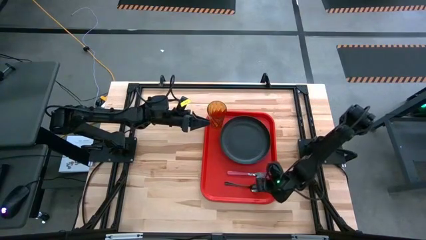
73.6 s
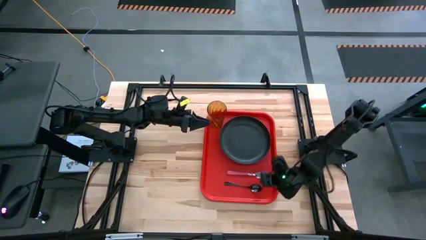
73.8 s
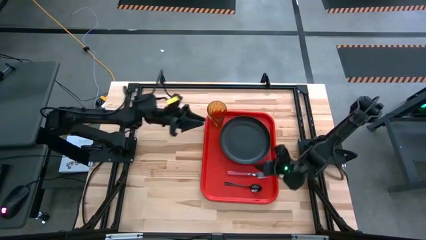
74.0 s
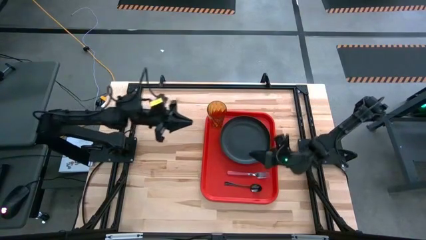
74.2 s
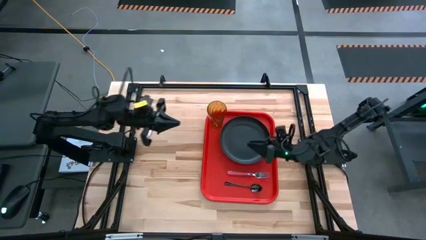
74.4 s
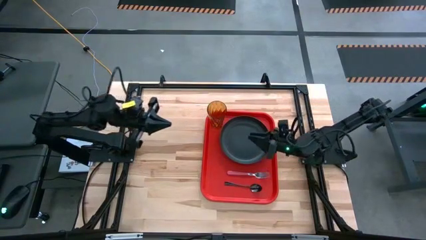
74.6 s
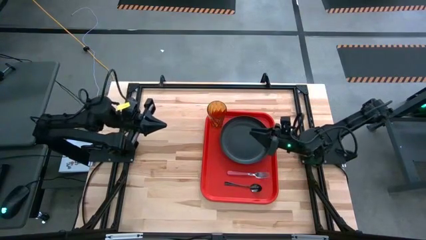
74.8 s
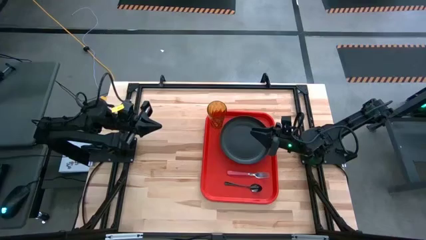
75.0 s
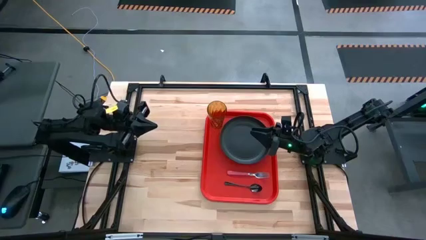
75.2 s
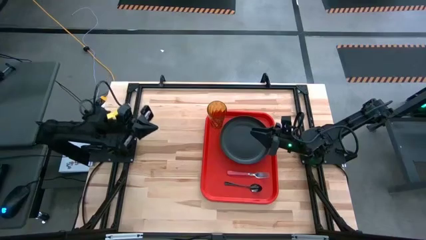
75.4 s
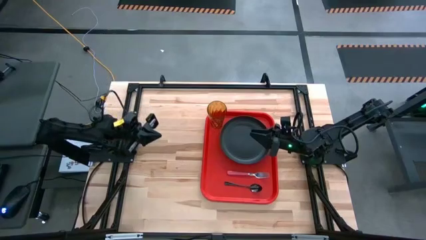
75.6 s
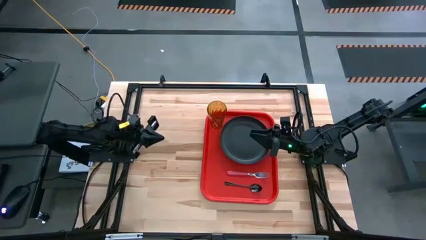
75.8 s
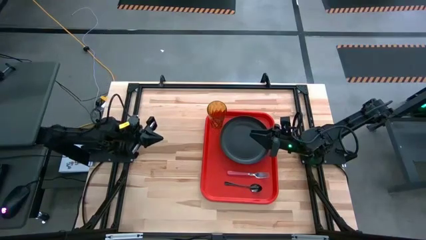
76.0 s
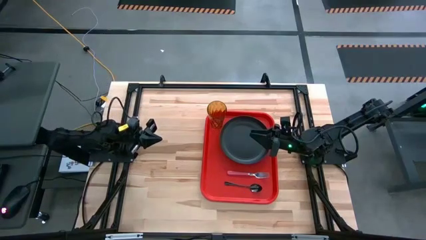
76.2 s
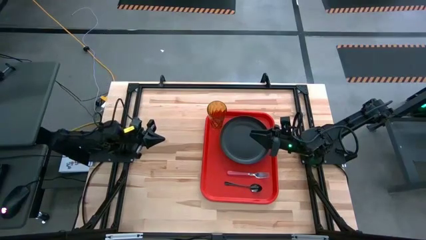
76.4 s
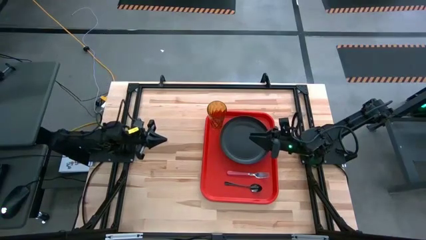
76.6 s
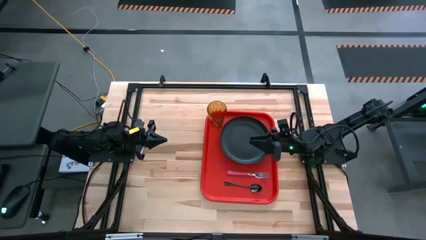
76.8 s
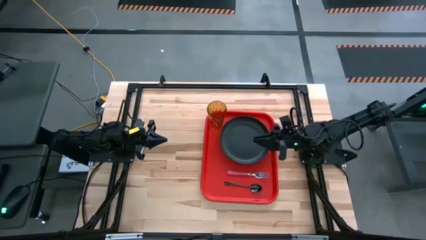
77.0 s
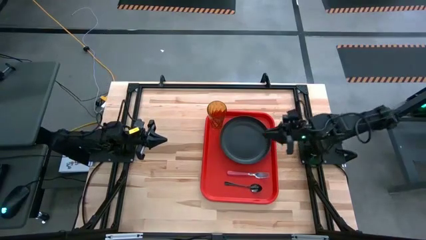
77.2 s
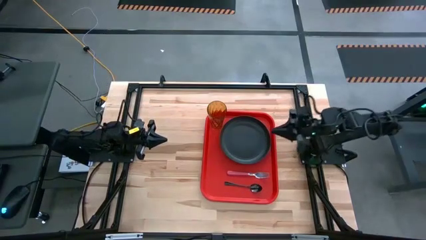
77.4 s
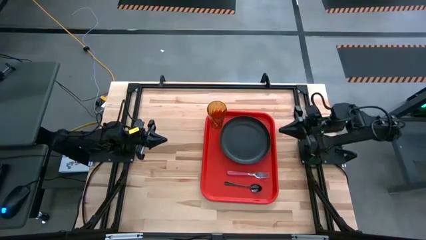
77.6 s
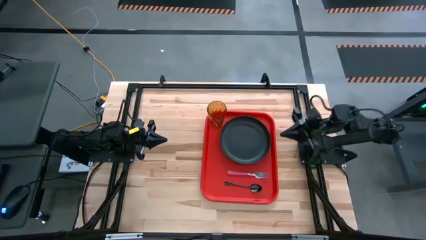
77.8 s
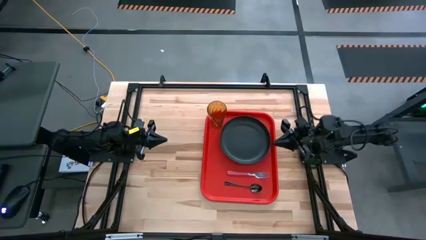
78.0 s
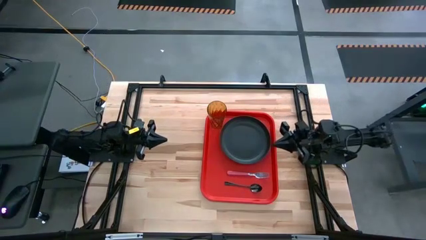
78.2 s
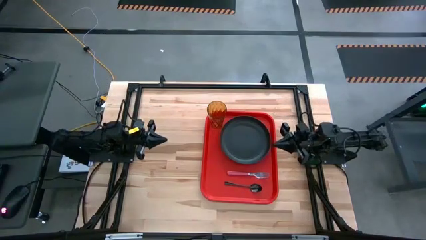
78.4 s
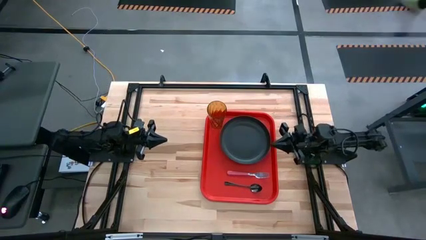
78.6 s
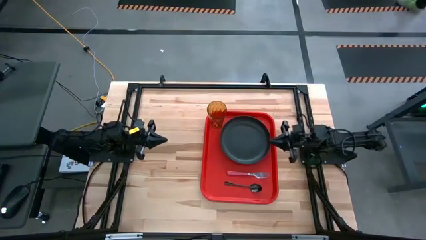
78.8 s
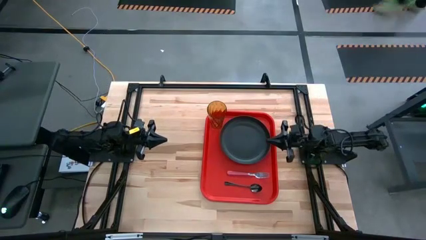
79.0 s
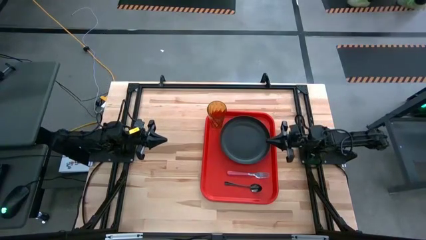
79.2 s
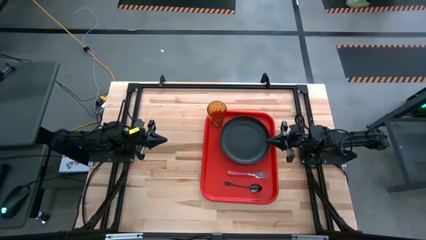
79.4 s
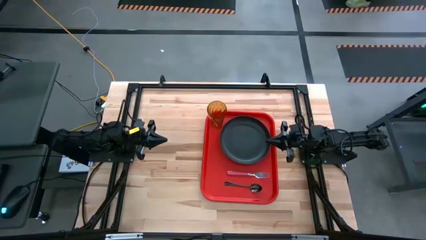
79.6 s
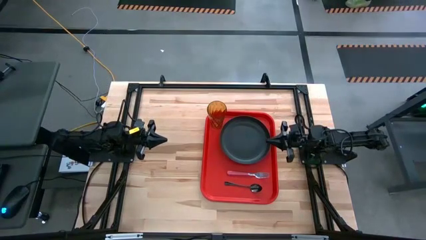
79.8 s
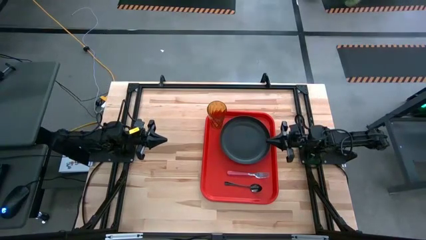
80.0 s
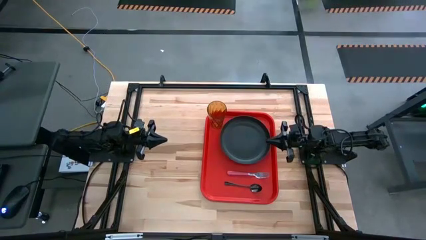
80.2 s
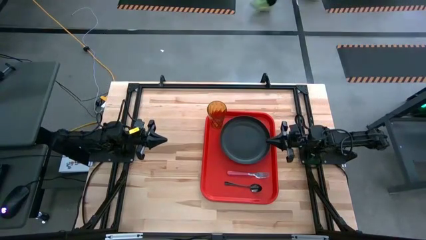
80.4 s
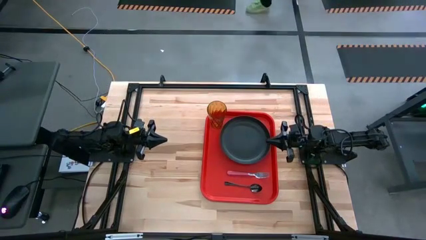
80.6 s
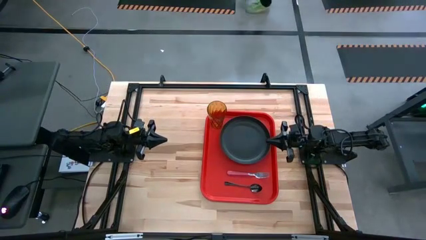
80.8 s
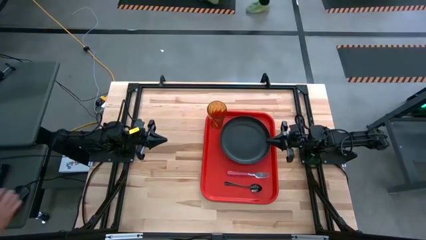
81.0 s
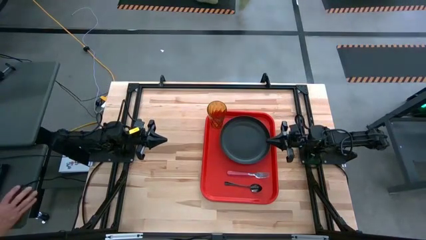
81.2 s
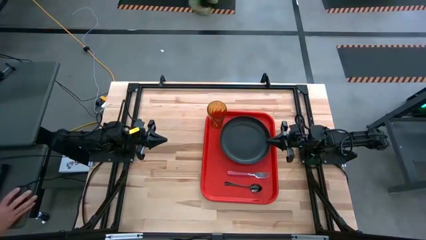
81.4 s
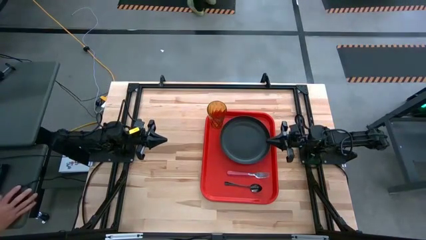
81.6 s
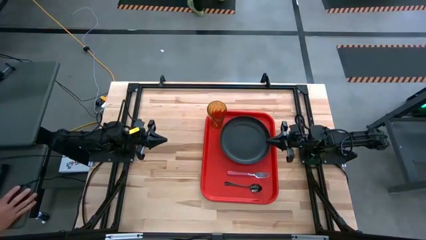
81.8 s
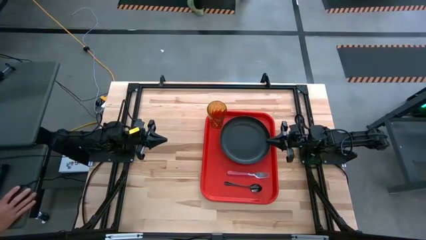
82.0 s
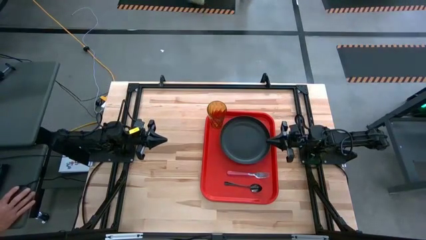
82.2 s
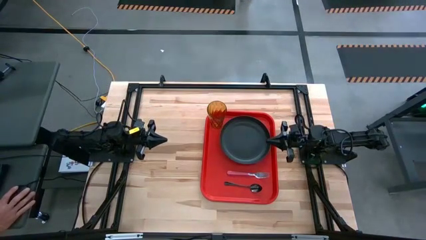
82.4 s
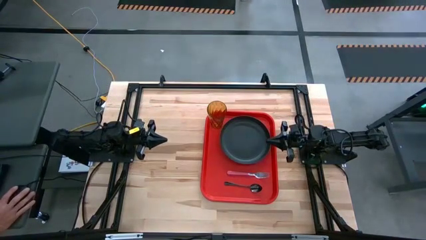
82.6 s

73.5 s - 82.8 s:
Task: Pick and place plate/cup/fork/spoon on tray
Return to Home Position

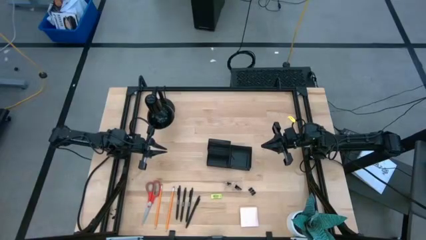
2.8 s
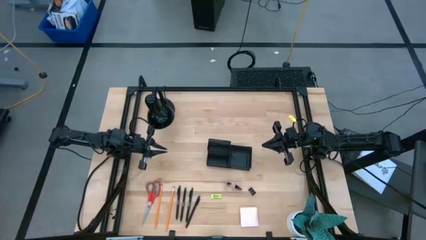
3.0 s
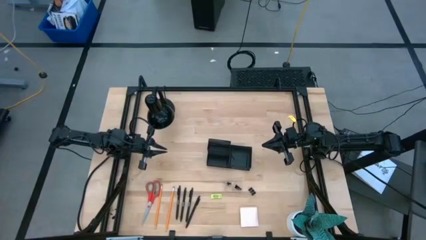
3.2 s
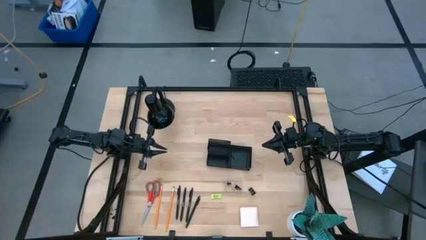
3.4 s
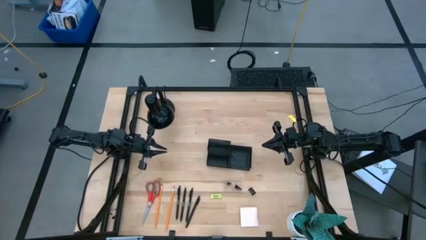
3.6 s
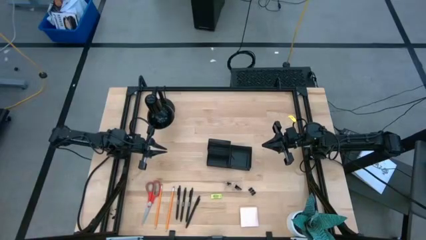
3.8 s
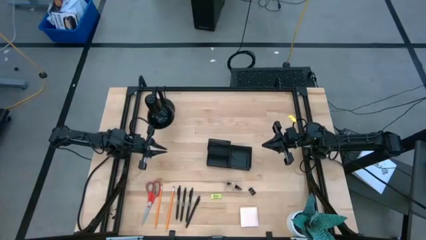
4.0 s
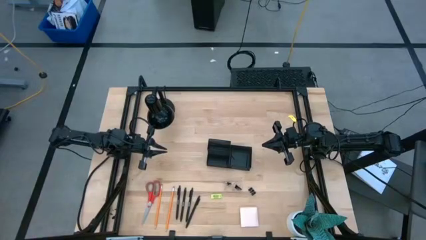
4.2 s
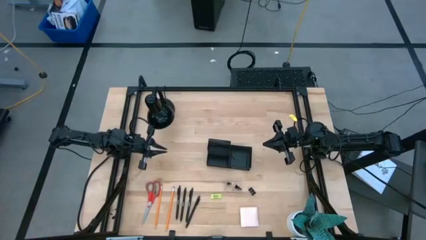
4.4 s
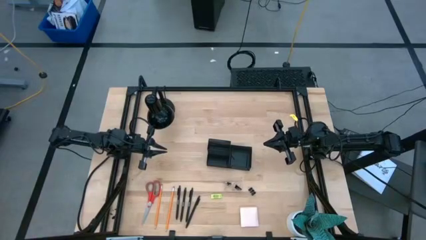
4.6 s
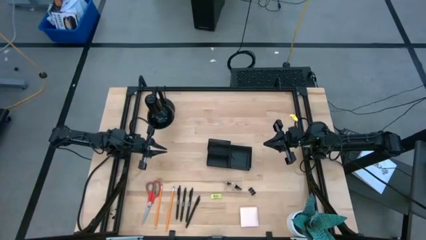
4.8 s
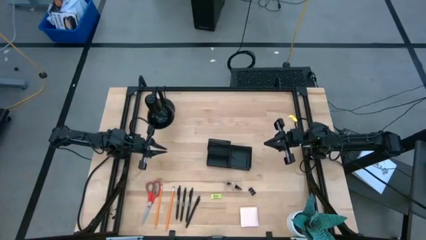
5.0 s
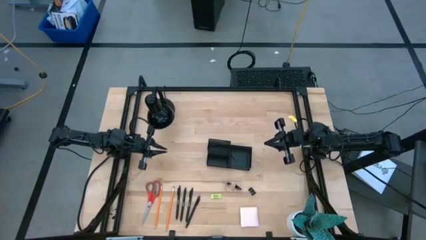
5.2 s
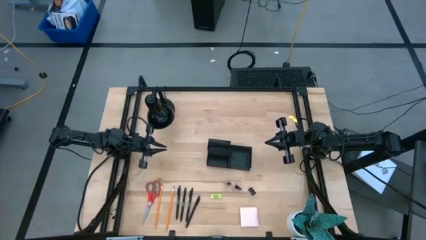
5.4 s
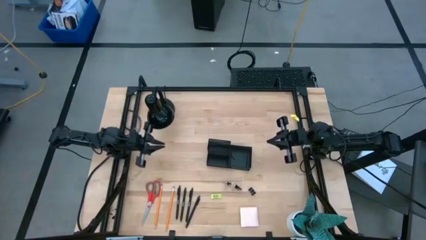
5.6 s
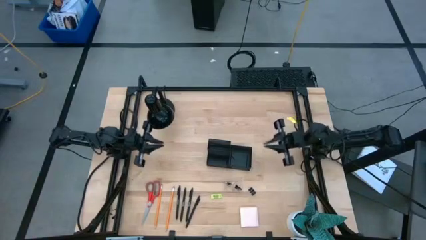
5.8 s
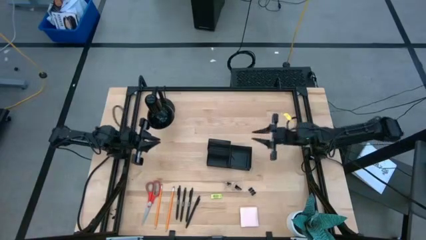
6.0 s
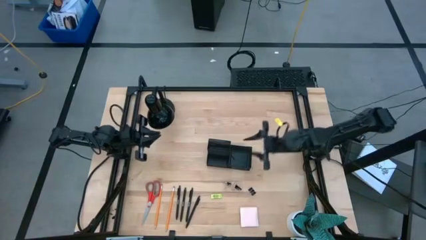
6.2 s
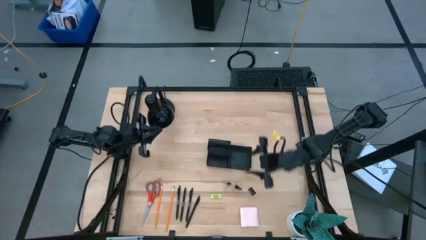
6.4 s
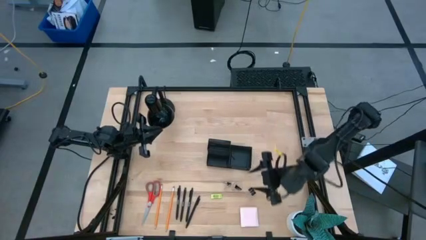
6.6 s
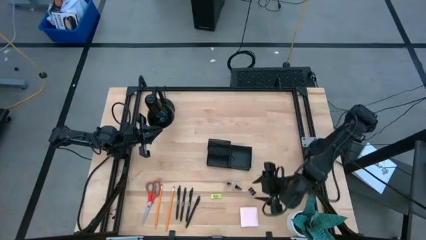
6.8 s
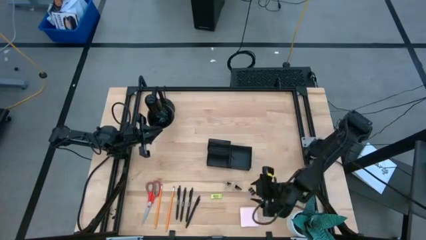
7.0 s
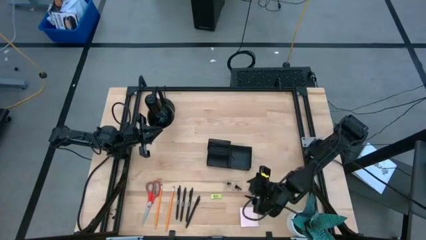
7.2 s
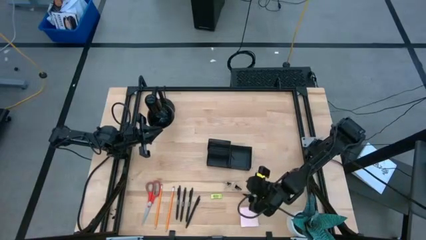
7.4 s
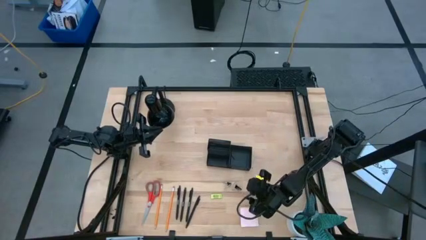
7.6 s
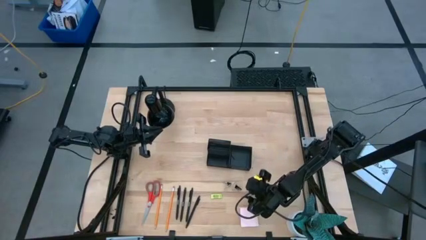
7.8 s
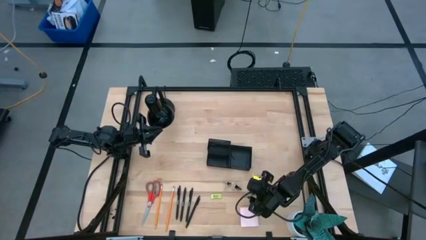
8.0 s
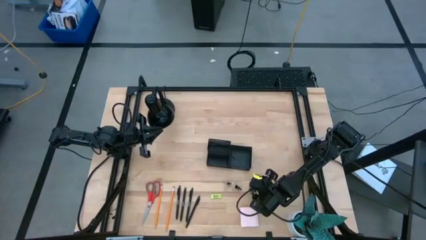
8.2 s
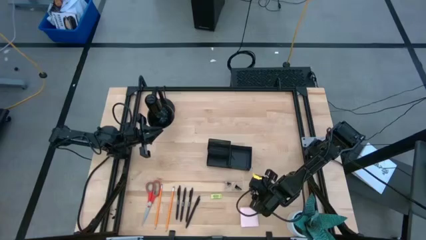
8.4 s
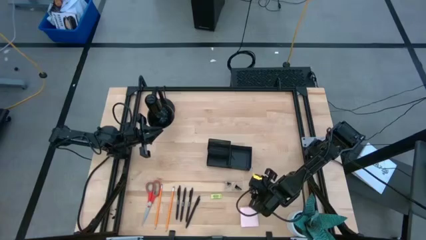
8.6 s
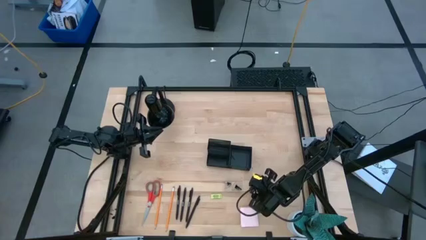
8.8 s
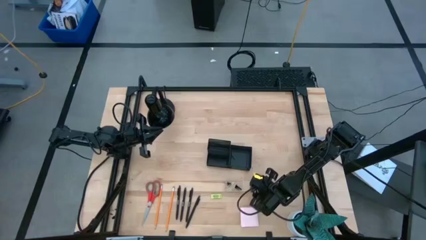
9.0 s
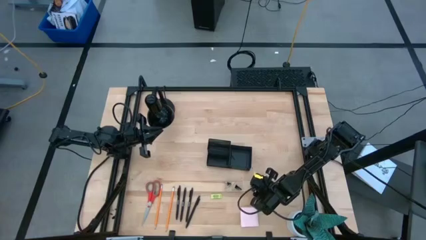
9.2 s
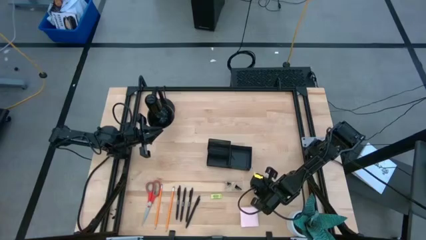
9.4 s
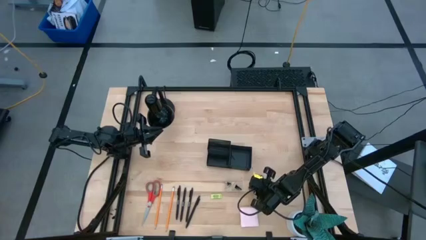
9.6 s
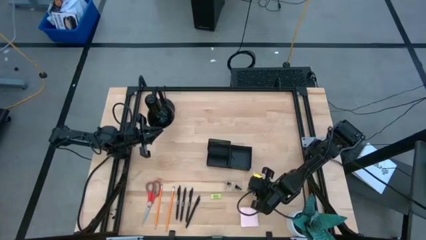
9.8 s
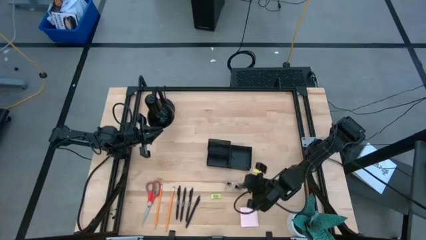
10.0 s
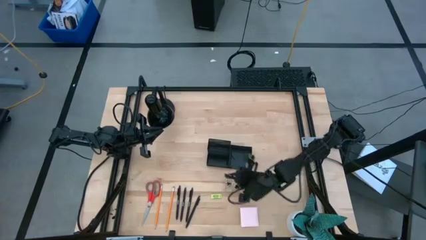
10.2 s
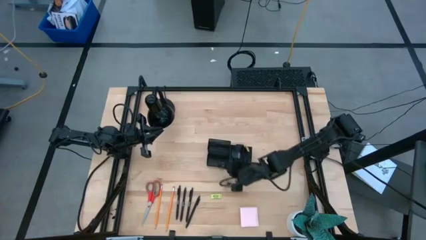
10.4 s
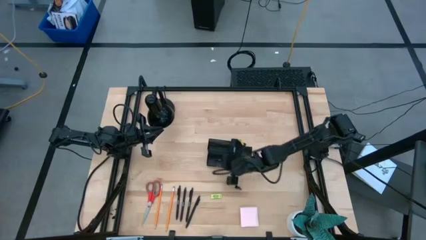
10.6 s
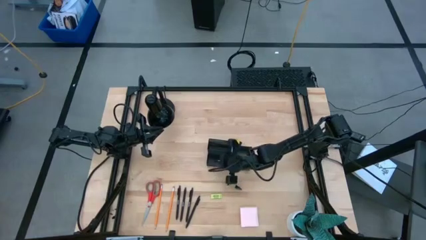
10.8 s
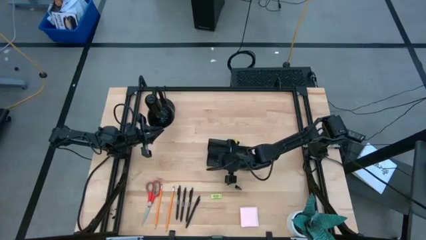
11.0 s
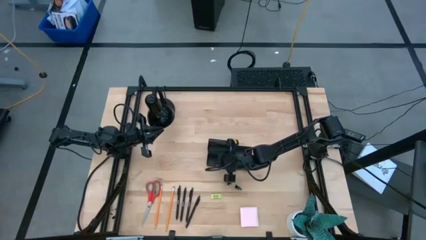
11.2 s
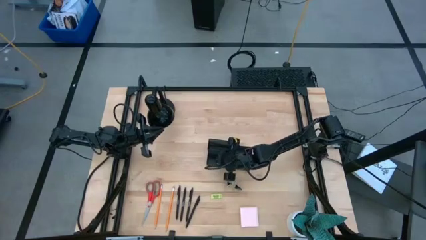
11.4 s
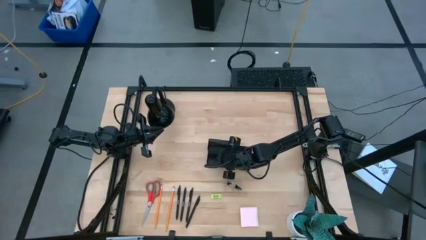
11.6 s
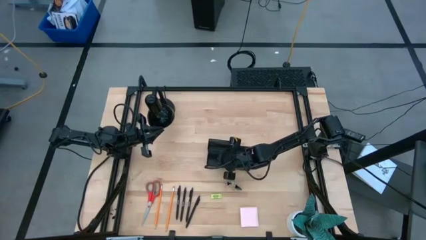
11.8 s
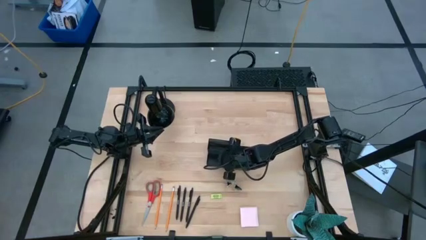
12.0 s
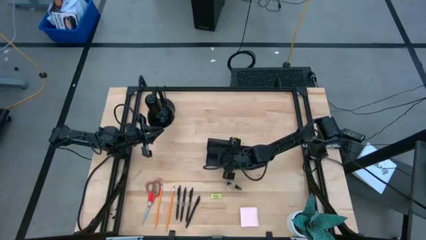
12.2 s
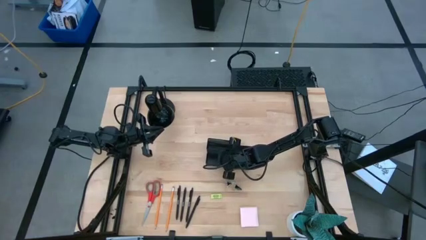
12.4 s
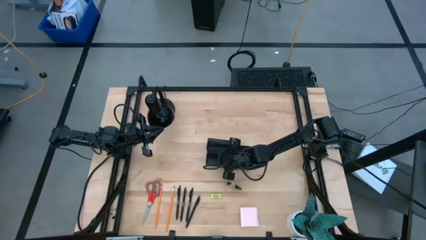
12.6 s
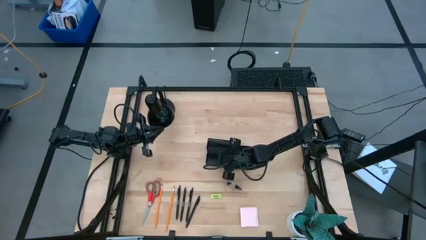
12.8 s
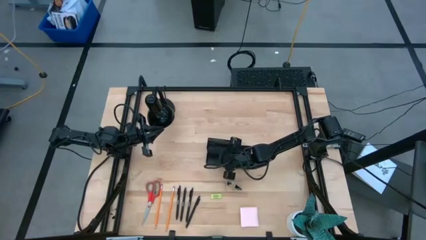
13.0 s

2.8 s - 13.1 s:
Task: Pick and place office supplies into organizer
Put the black binder clip into the black desk organizer
